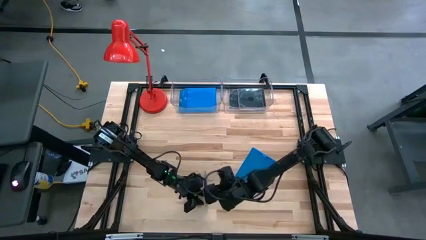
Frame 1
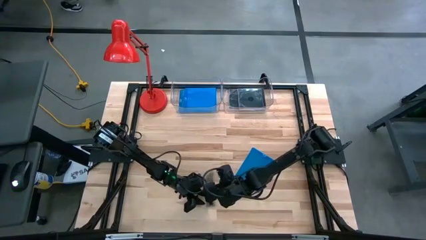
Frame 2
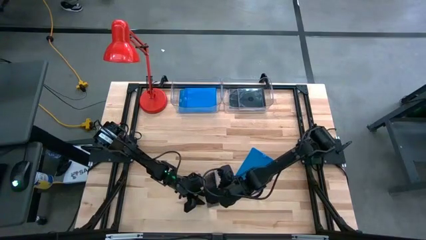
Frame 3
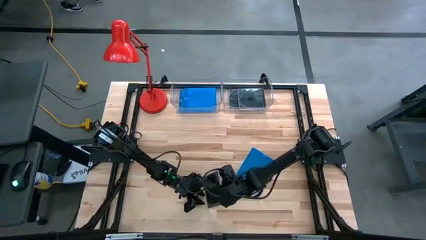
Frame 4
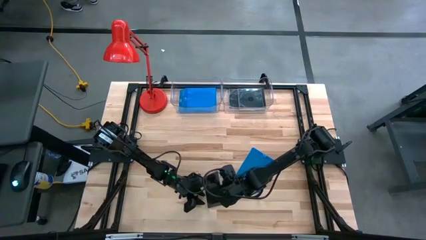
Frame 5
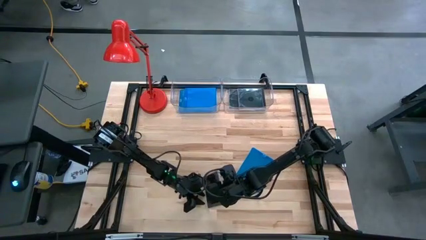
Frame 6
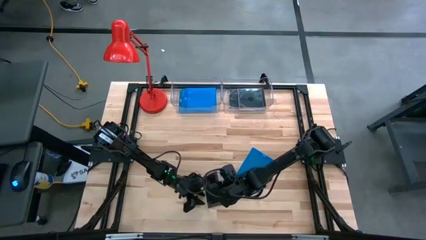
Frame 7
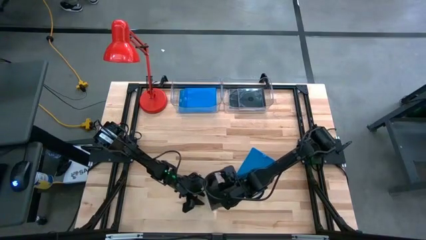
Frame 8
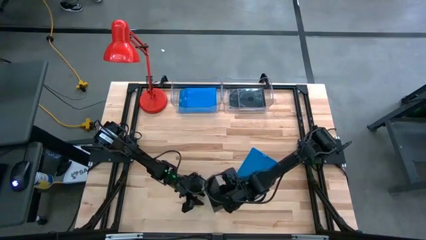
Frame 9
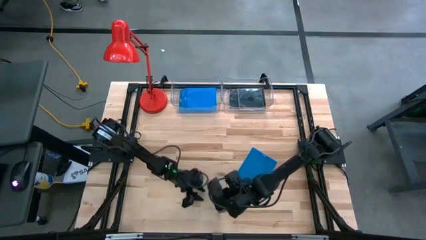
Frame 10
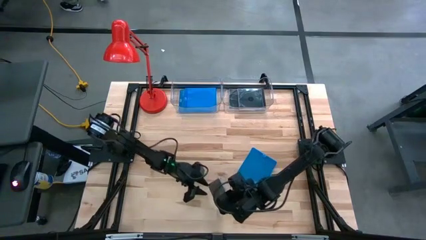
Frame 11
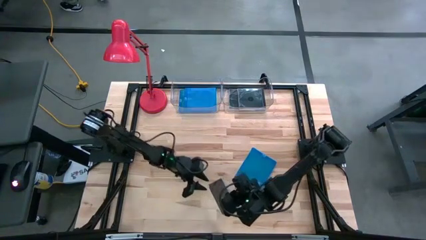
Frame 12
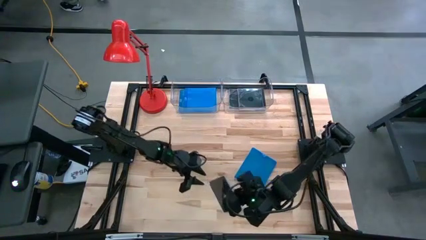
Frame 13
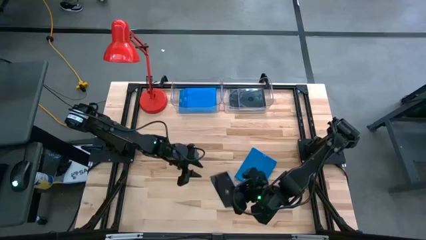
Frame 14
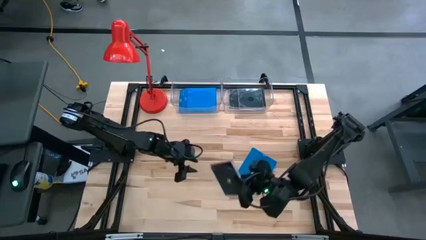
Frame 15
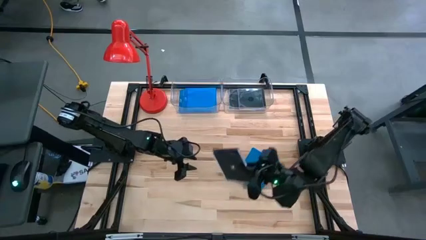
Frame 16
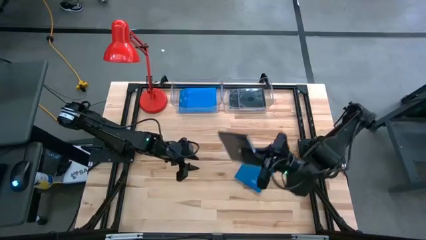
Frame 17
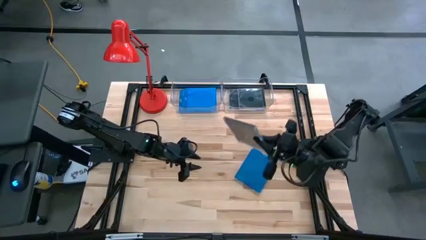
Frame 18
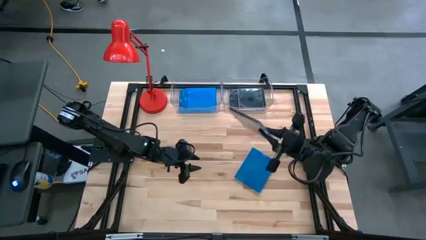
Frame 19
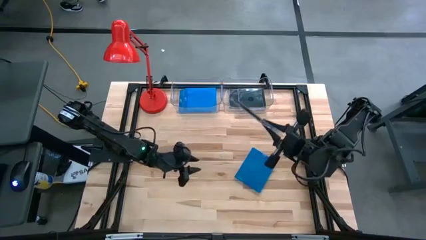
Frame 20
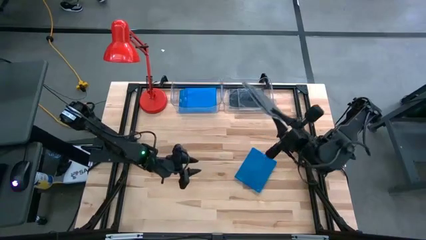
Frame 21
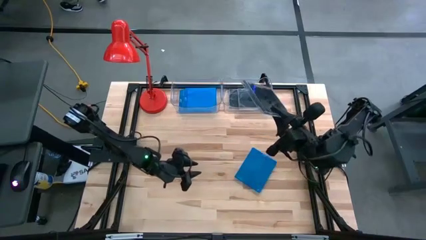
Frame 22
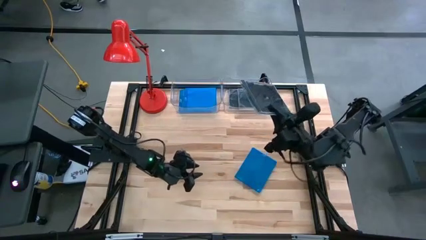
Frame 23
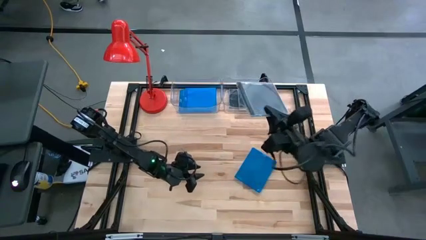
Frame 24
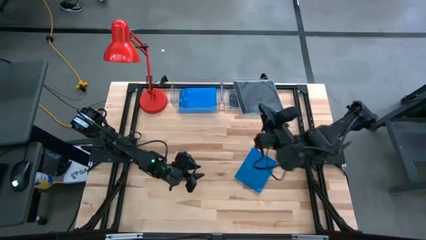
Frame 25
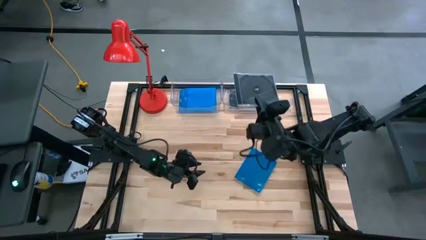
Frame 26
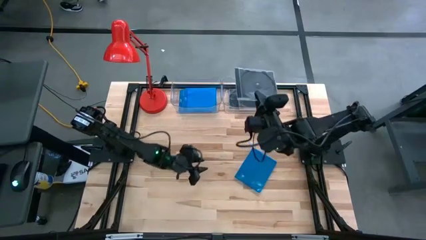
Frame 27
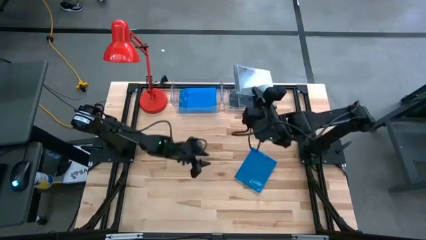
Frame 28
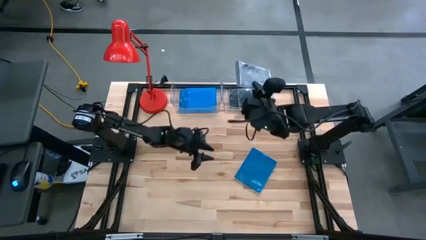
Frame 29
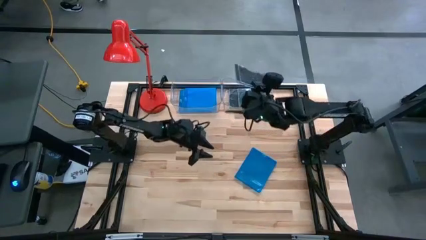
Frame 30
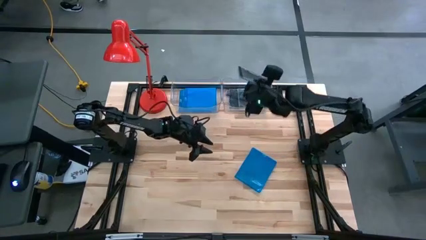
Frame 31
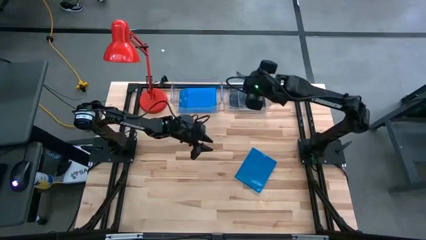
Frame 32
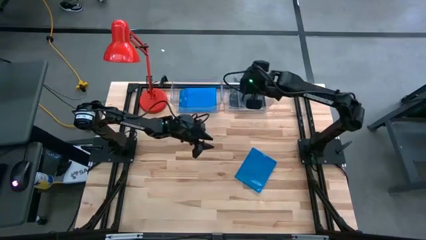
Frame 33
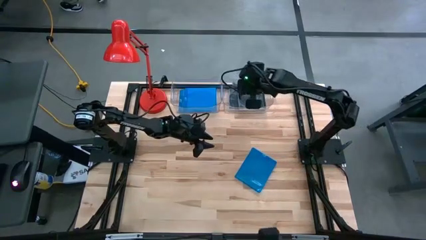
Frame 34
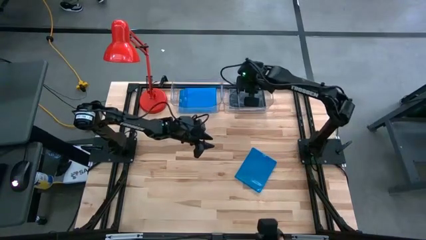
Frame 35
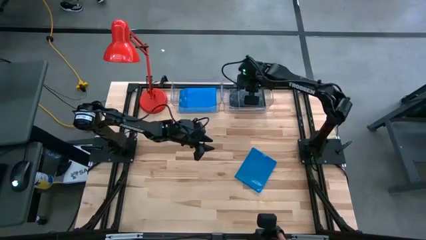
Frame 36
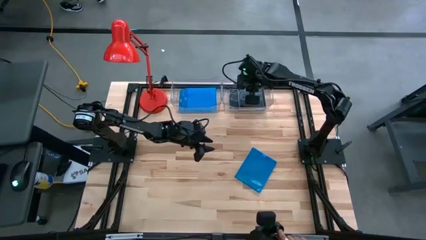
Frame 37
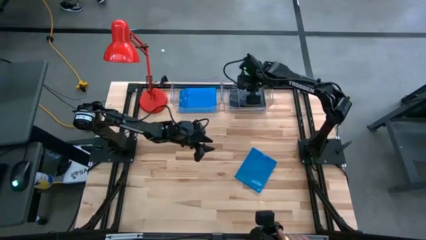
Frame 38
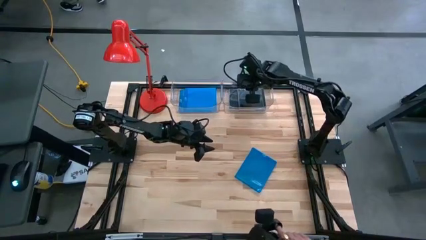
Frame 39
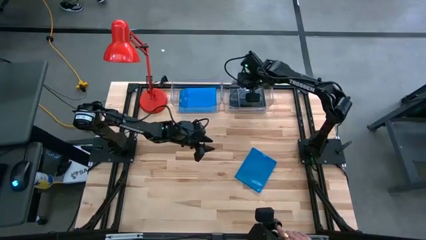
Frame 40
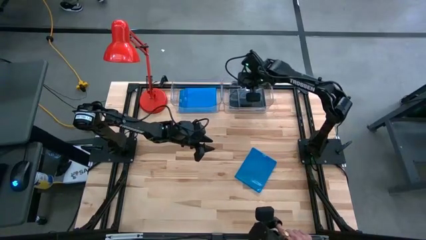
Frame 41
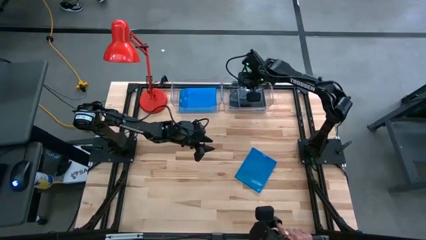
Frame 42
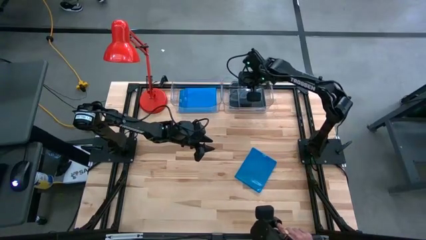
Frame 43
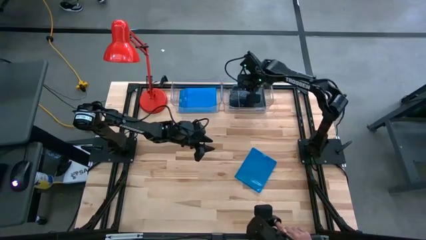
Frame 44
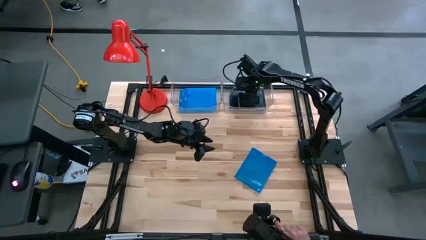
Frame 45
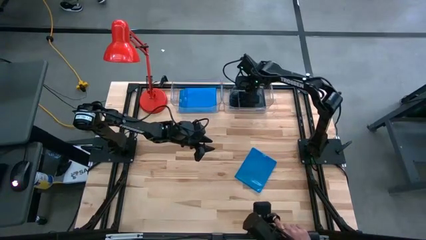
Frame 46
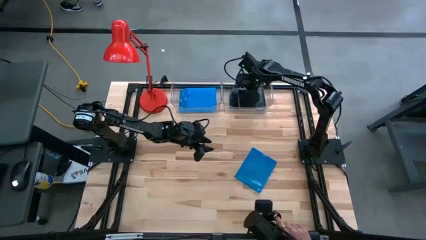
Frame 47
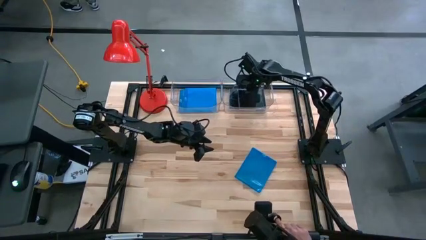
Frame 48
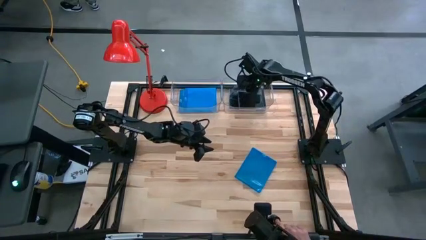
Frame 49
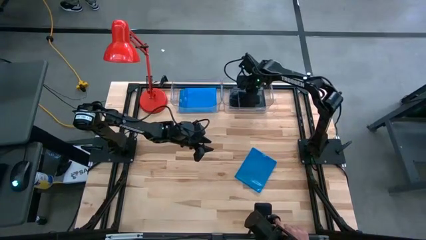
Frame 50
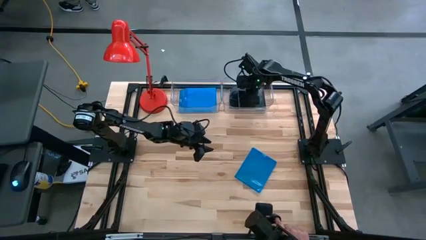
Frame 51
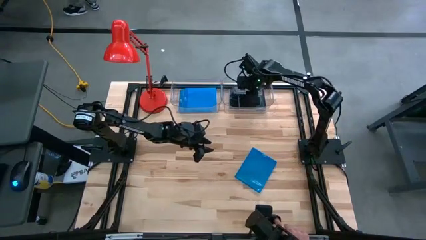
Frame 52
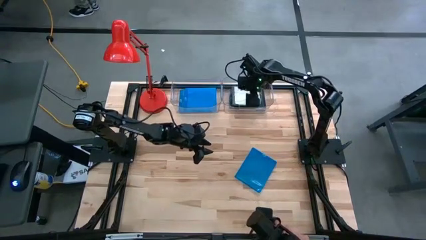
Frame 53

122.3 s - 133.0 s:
Task: Pick & place jewel cases by type
Put the black cd case into the right transparent bin

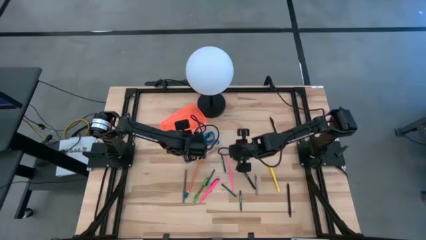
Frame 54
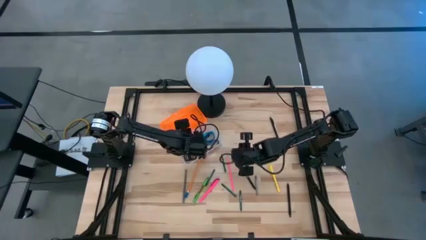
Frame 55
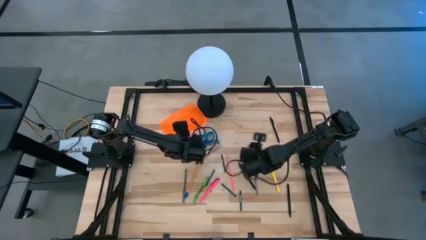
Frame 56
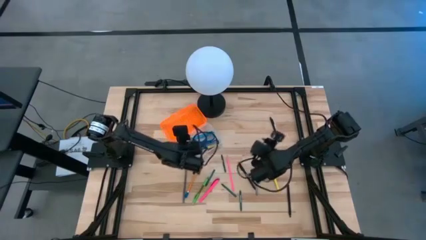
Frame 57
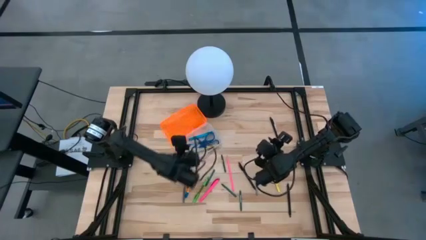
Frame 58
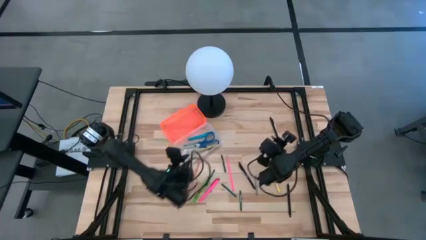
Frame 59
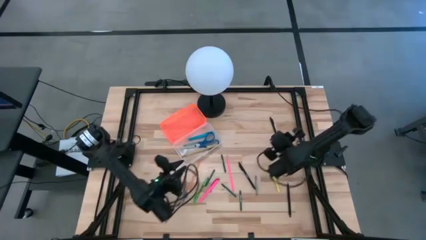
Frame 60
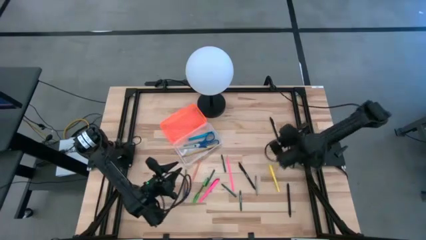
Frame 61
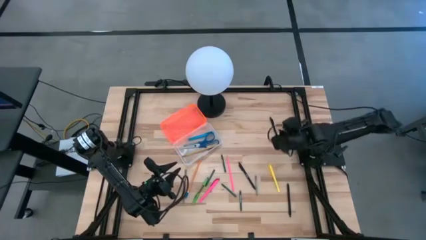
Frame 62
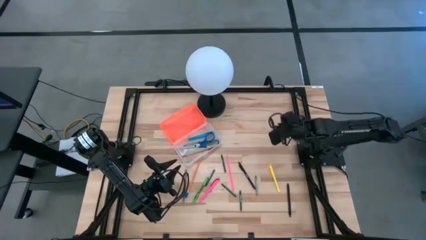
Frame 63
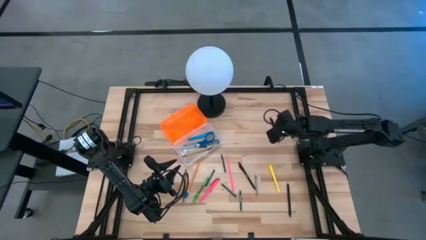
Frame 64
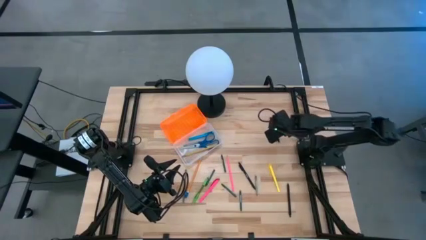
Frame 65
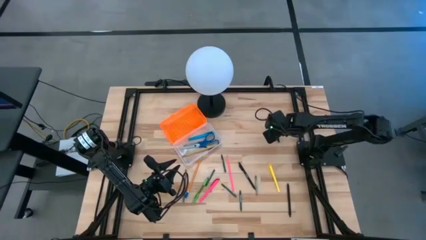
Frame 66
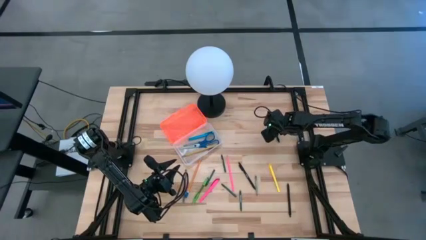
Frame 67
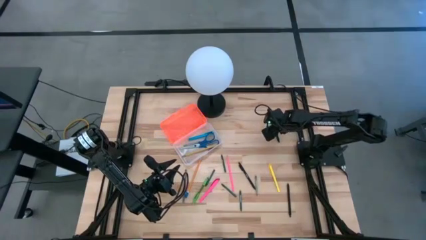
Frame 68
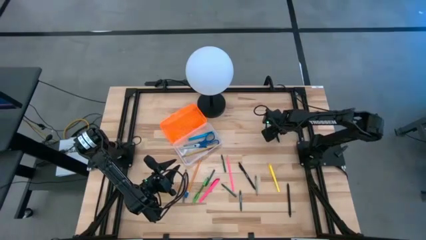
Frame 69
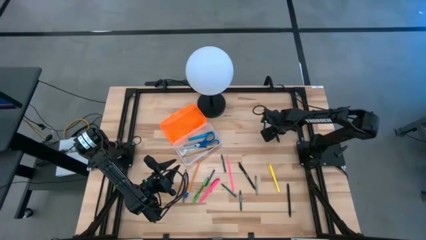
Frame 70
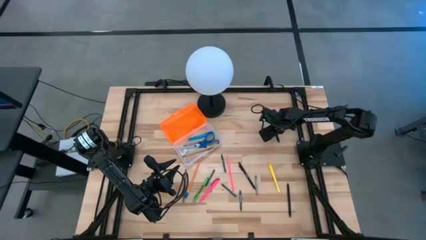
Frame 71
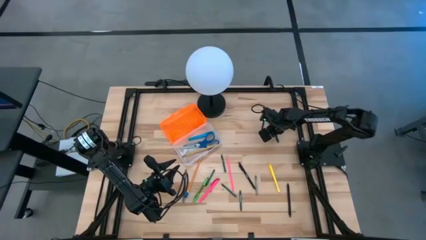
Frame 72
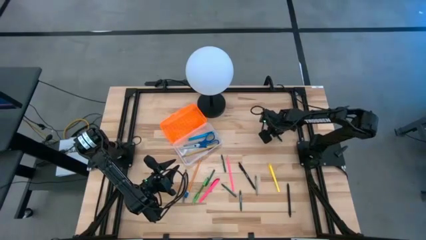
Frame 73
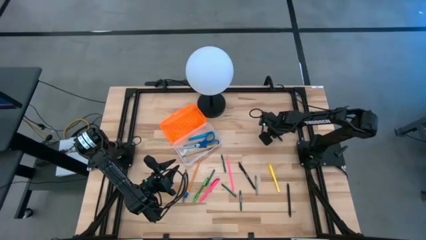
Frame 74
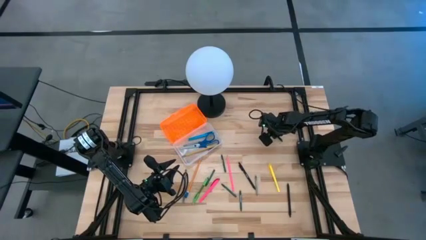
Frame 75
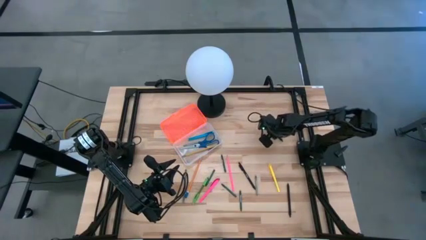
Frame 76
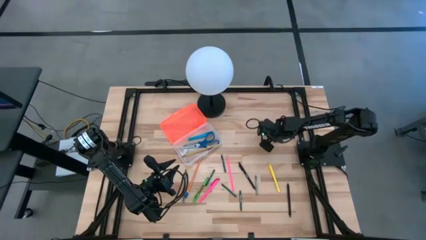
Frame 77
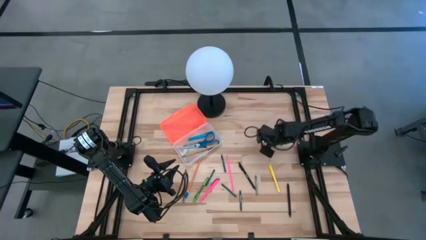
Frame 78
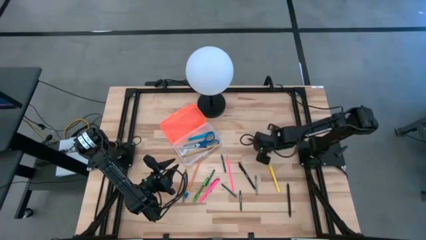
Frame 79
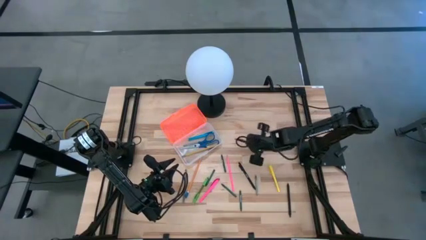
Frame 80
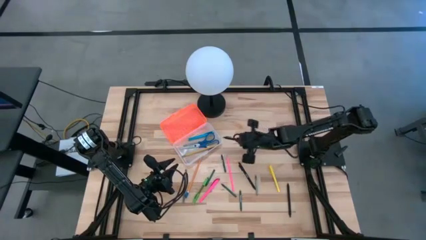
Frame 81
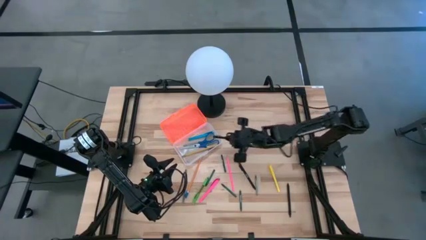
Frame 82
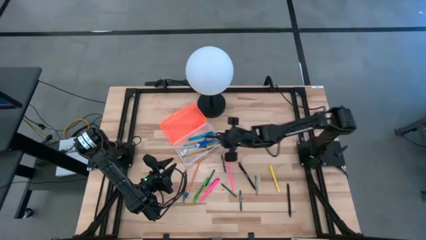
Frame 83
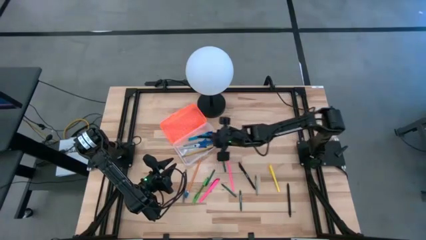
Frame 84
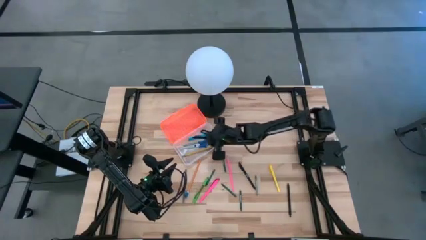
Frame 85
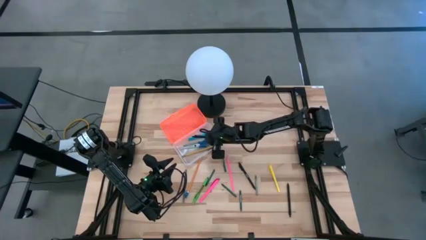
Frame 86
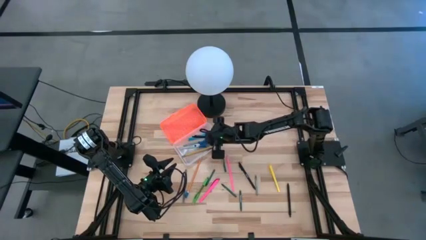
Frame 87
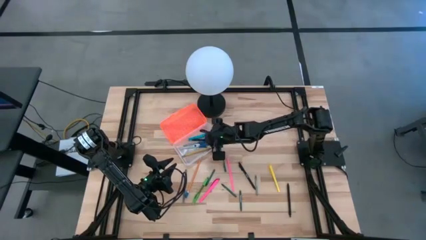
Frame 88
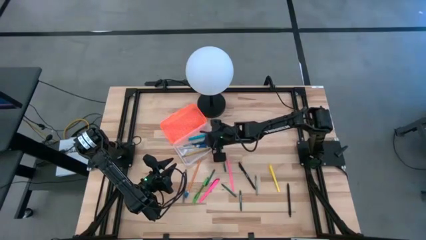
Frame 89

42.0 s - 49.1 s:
Task: Pick & place school supplies into a supply box
Put the top right black pen into the orange supply box
